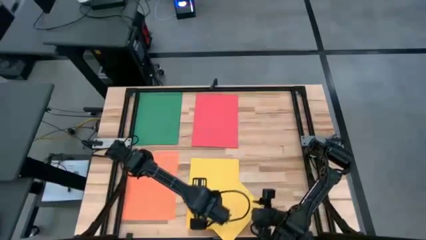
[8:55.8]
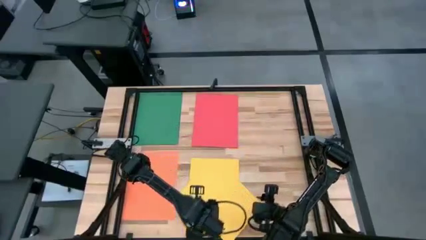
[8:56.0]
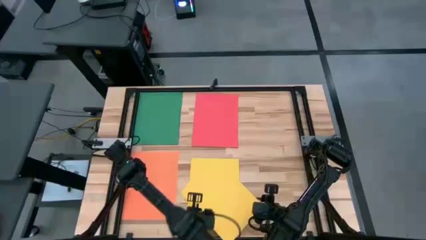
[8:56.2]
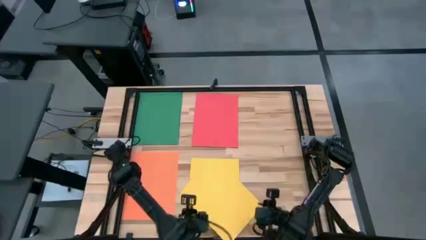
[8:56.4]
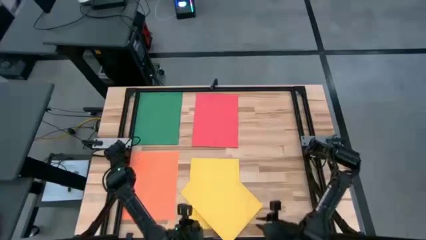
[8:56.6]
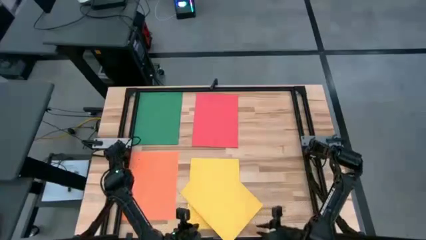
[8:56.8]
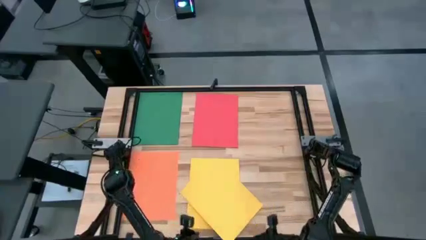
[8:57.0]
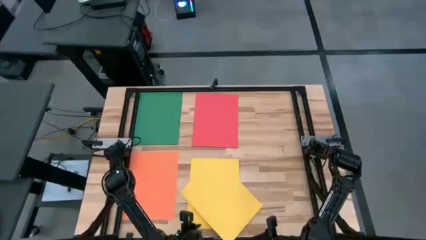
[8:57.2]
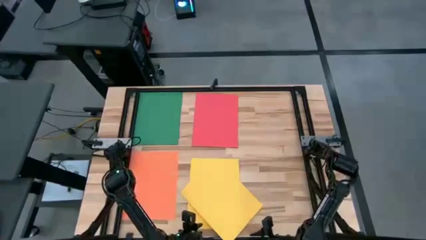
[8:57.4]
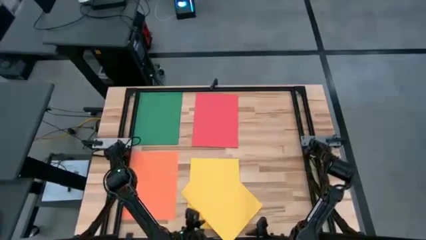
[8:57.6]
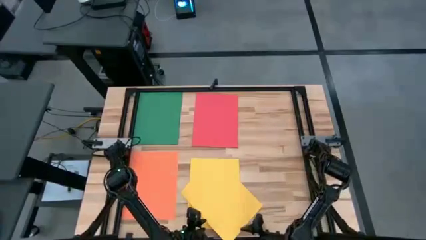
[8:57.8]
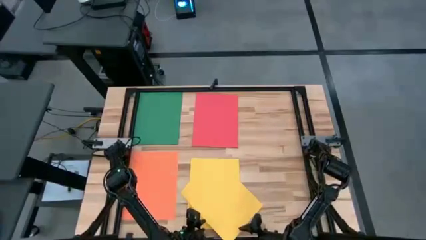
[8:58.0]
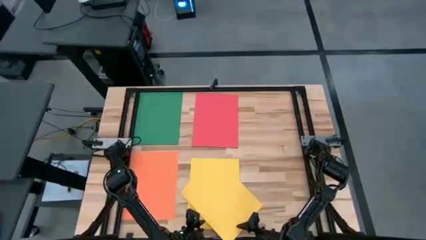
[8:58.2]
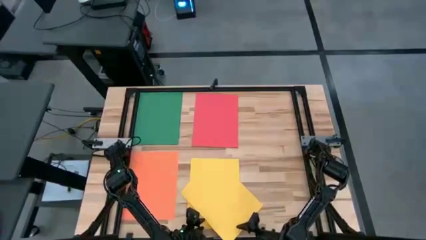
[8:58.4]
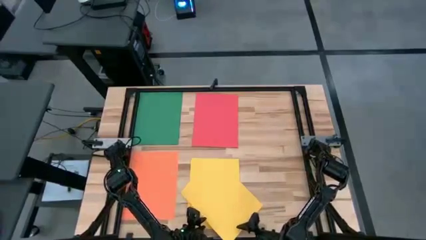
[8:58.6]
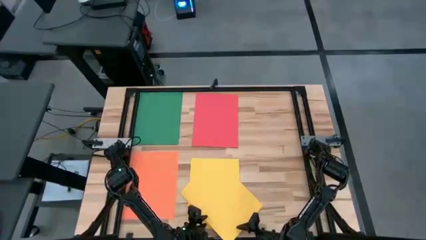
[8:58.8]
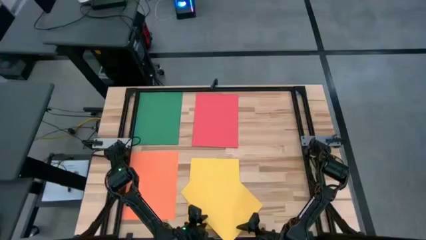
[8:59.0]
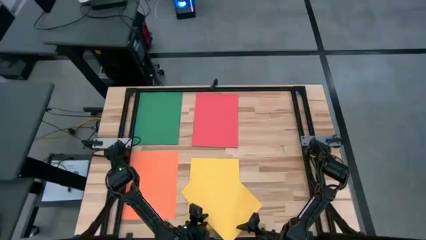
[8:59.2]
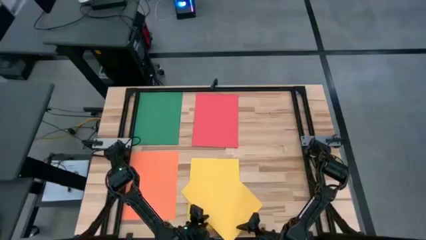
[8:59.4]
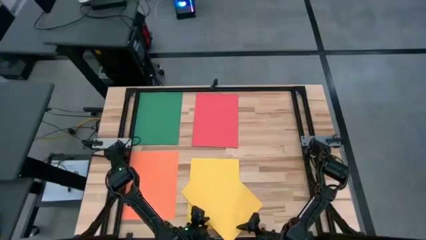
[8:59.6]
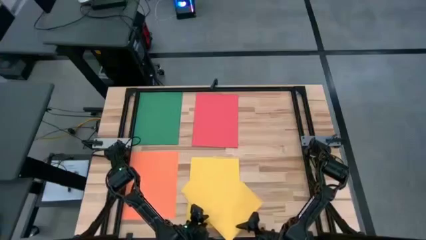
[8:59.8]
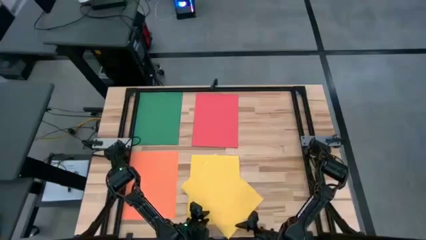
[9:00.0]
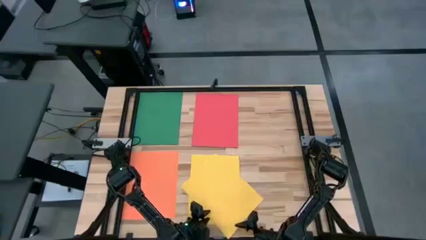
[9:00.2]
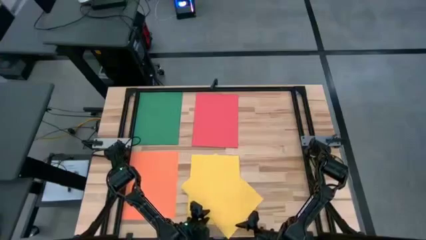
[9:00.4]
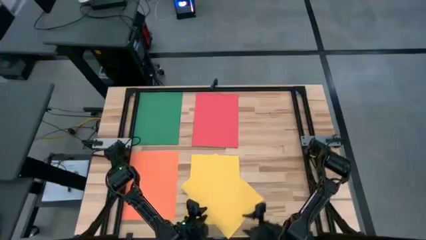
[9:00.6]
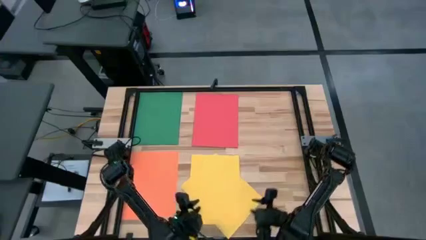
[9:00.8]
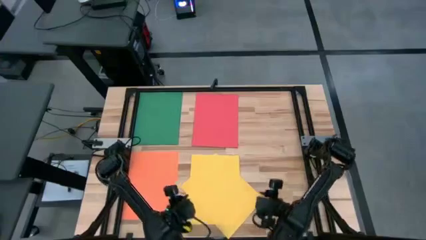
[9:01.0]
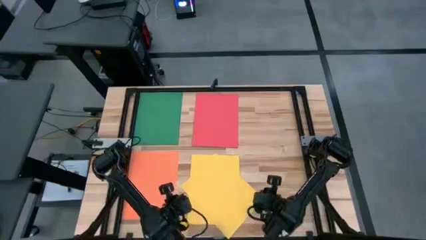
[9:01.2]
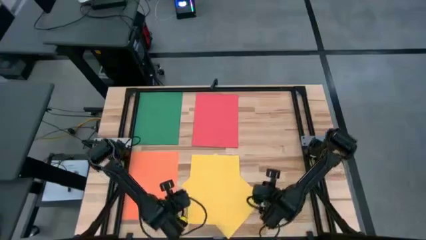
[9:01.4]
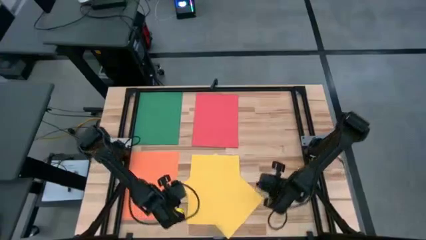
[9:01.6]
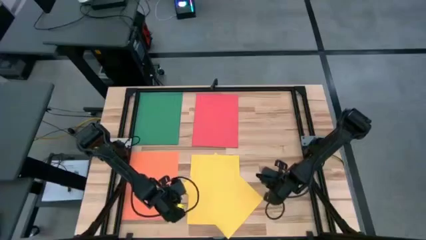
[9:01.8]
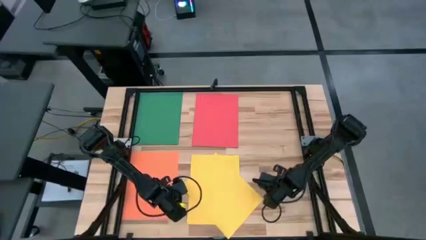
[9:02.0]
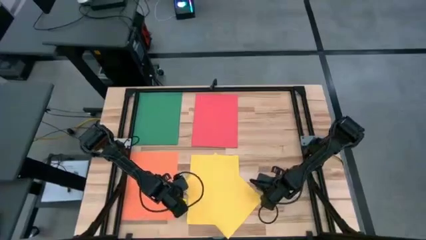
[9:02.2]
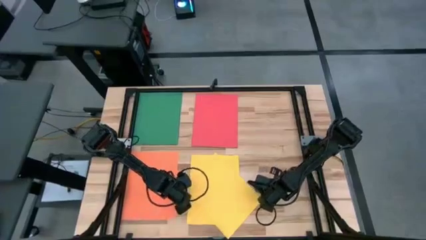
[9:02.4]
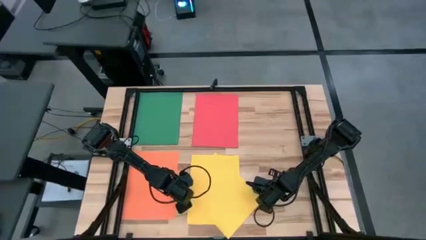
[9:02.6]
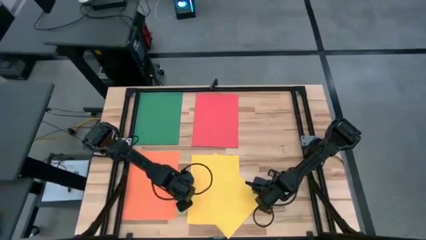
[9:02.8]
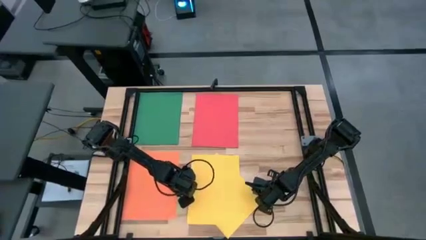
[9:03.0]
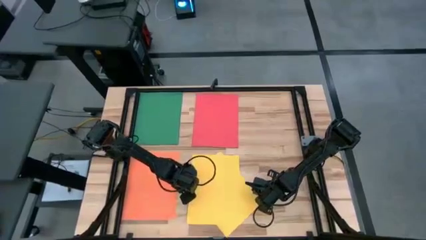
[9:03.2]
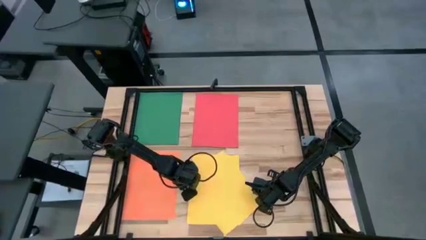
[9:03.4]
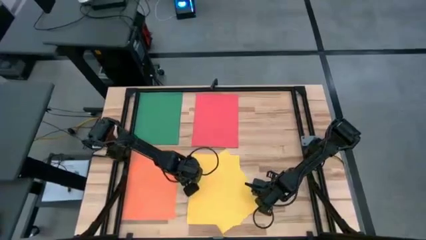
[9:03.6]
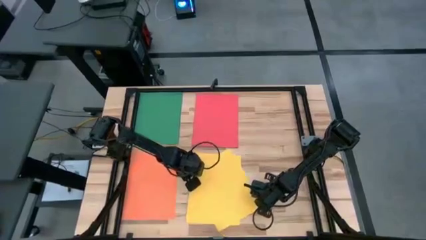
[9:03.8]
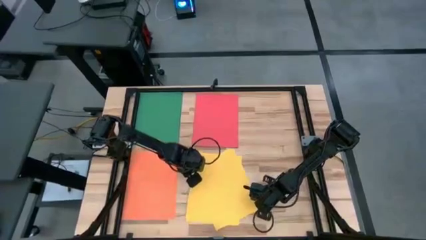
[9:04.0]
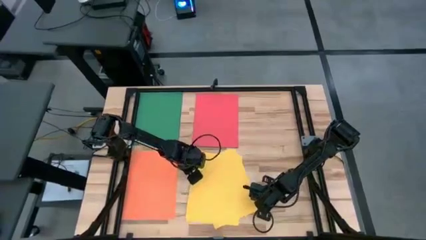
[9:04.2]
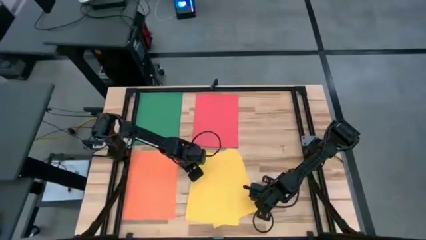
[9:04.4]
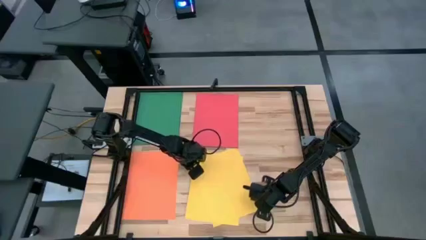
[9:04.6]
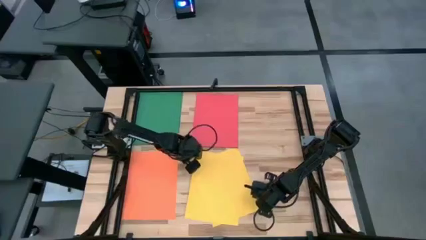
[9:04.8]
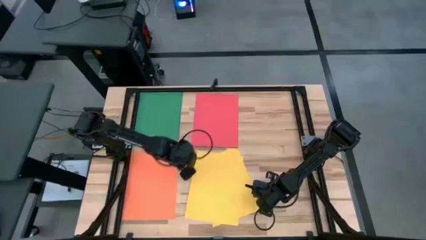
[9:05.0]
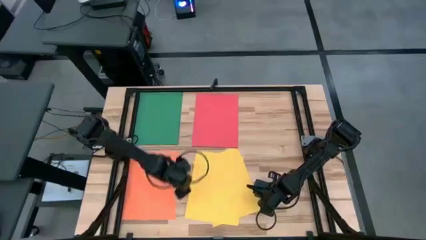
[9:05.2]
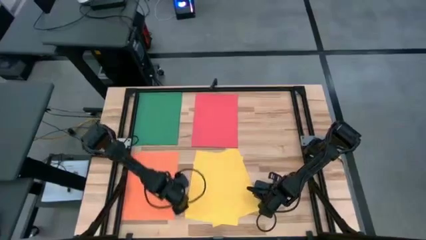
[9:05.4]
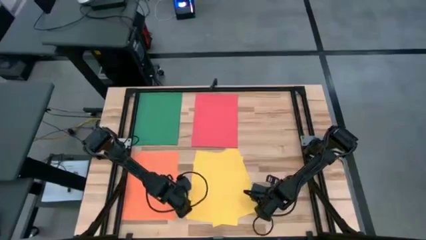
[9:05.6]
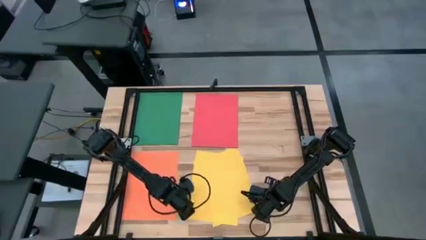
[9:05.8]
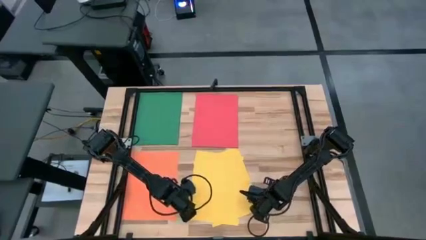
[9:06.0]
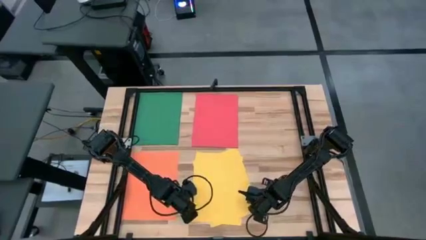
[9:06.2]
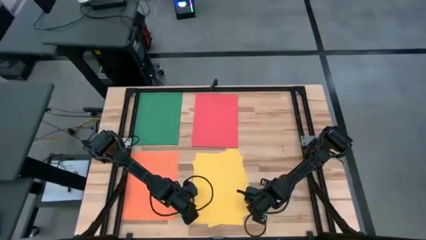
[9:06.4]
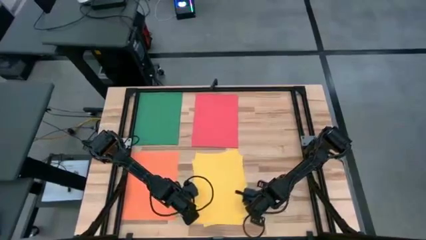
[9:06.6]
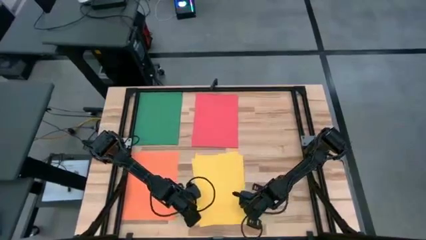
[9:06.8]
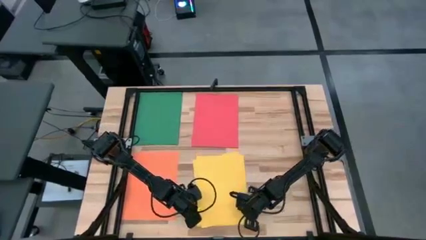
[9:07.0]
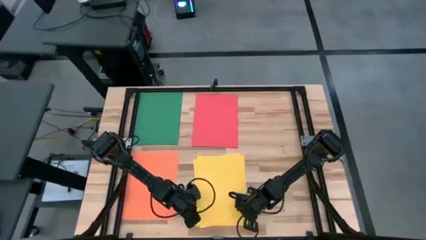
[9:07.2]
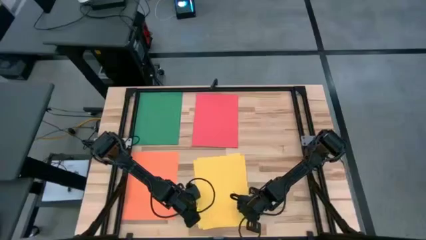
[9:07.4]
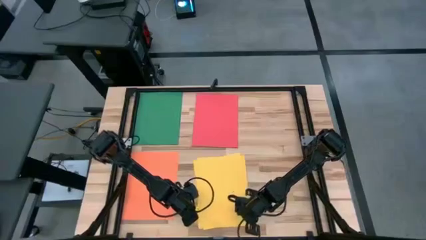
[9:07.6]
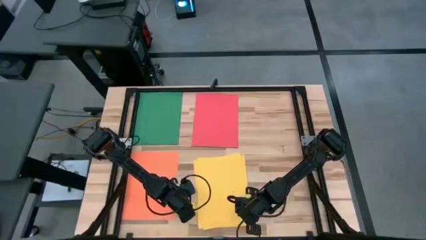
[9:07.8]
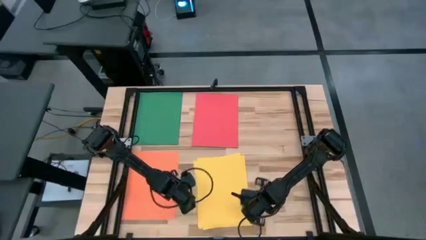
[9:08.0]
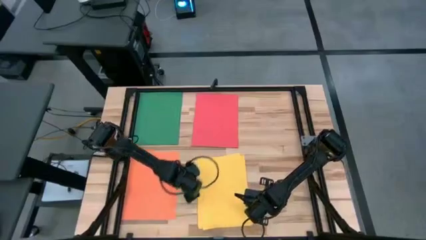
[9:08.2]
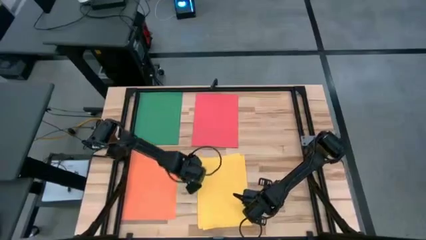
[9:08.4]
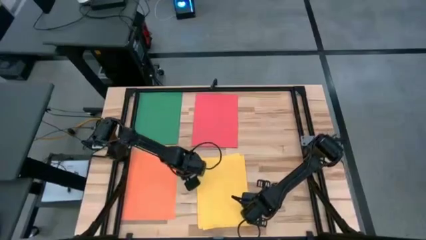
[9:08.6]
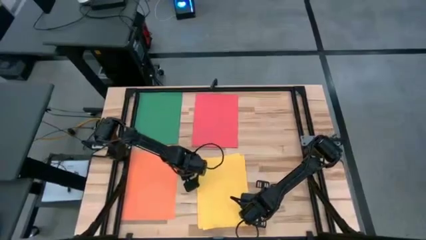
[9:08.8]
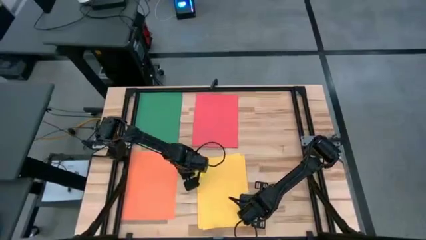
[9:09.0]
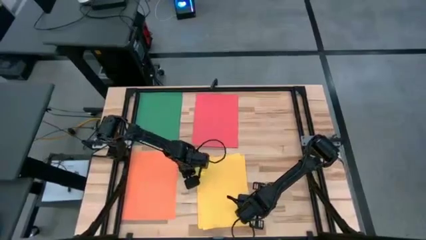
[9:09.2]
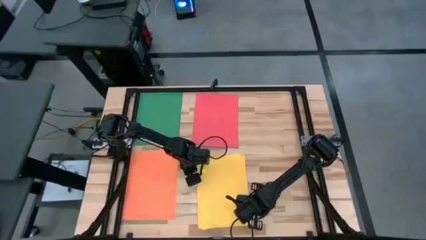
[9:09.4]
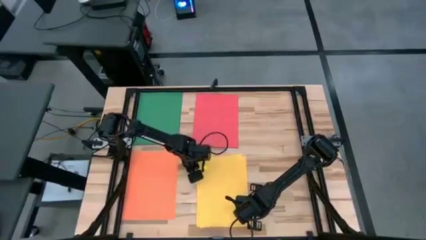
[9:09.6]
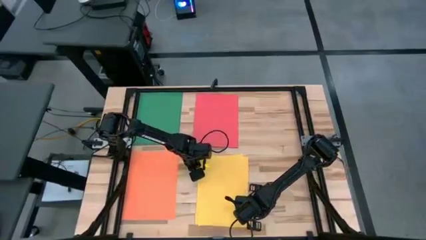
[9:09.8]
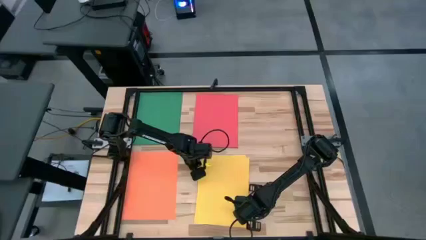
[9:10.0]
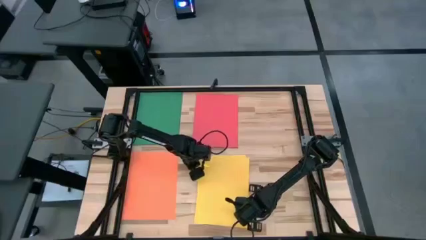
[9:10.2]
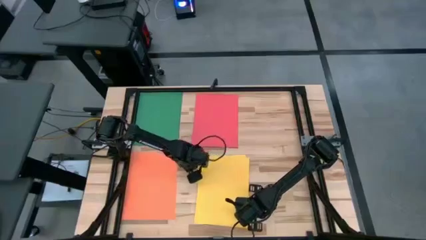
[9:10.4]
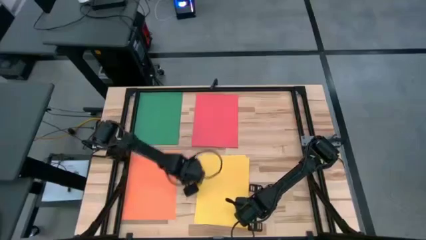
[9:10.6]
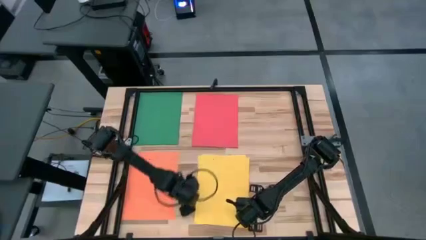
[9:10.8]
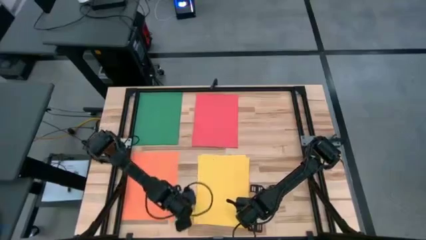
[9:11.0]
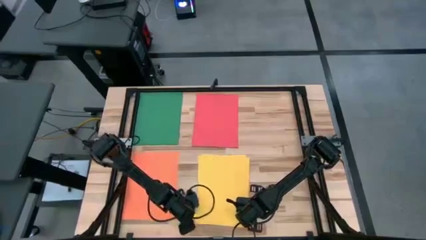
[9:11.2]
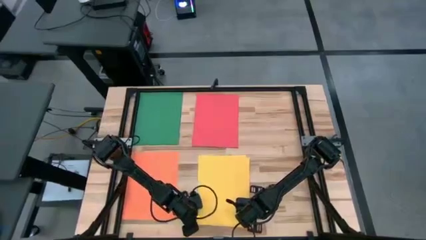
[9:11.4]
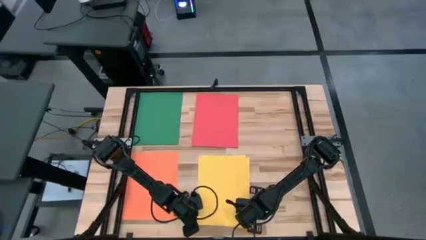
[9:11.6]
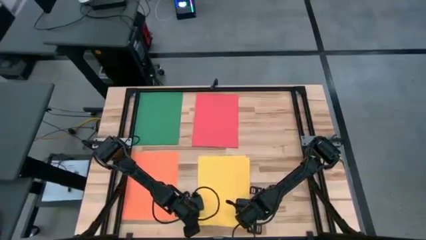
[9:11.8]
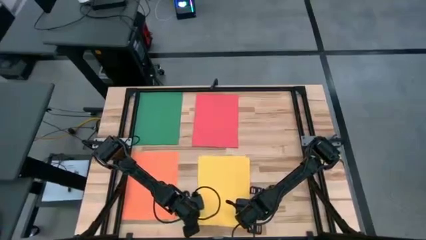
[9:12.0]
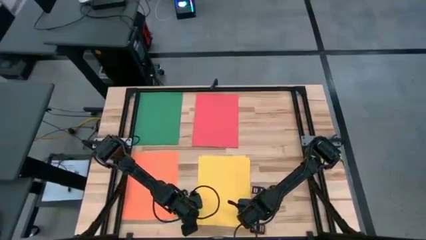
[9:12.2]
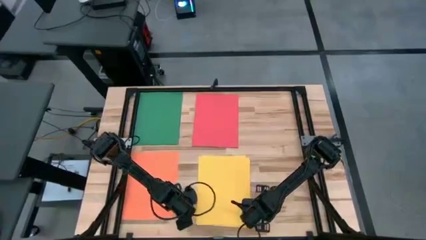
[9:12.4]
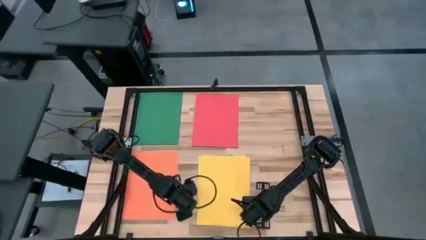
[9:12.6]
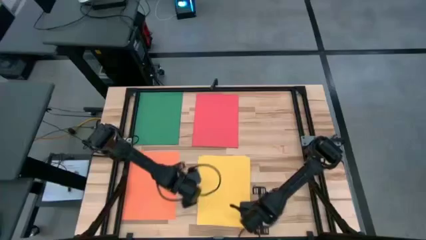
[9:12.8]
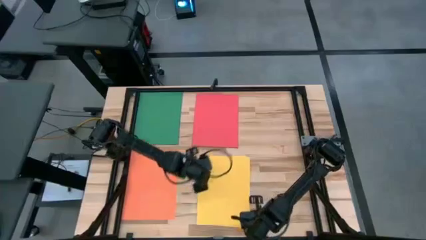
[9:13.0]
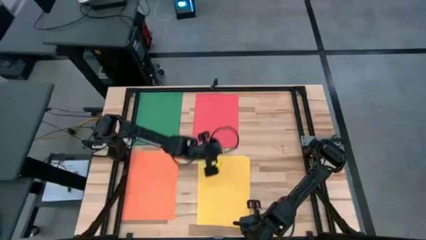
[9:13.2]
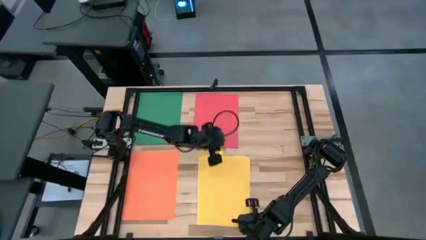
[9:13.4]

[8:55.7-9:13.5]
Task: Organize paper
Stack the yellow paper on top of the yellow paper
